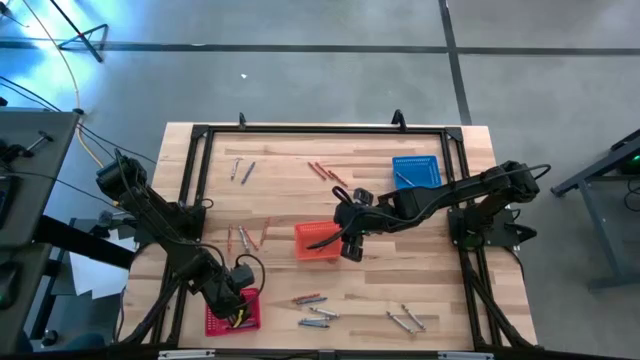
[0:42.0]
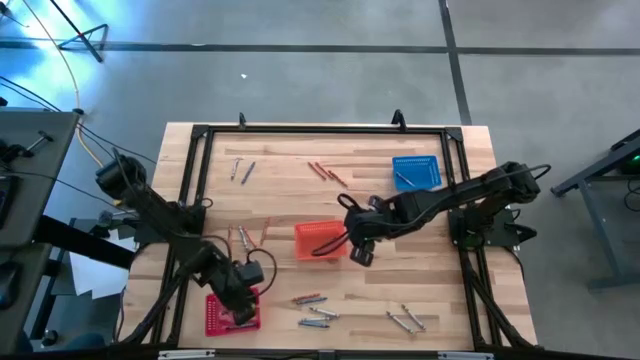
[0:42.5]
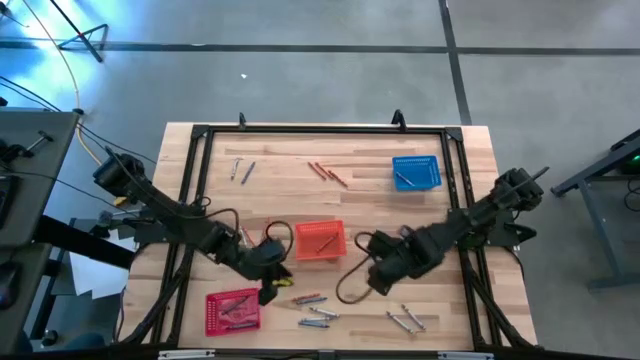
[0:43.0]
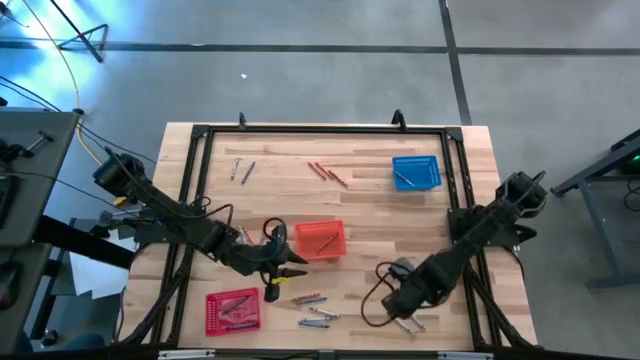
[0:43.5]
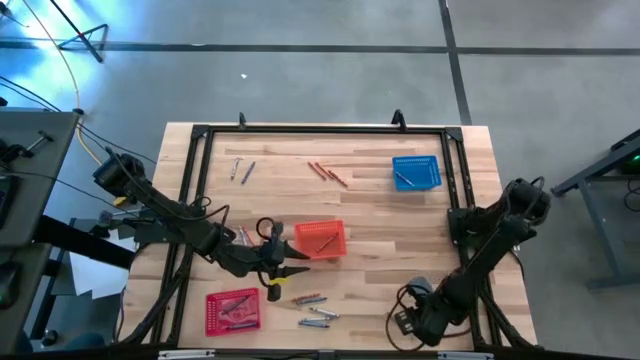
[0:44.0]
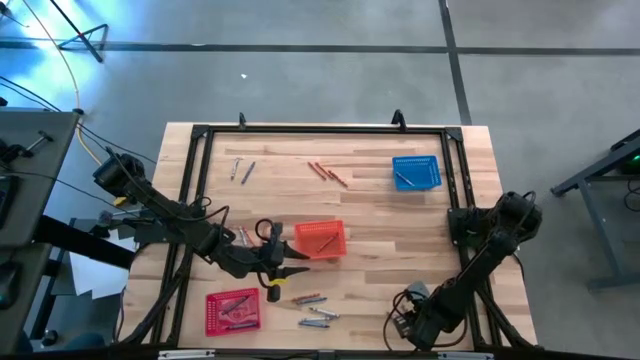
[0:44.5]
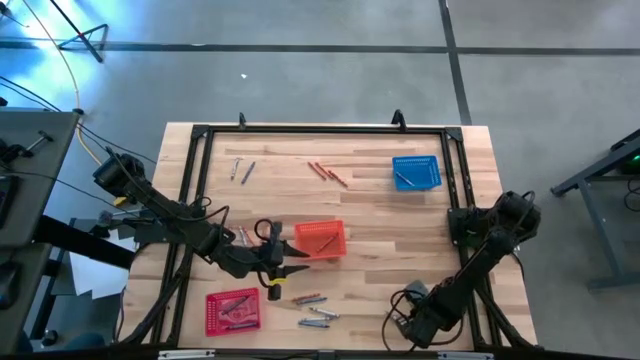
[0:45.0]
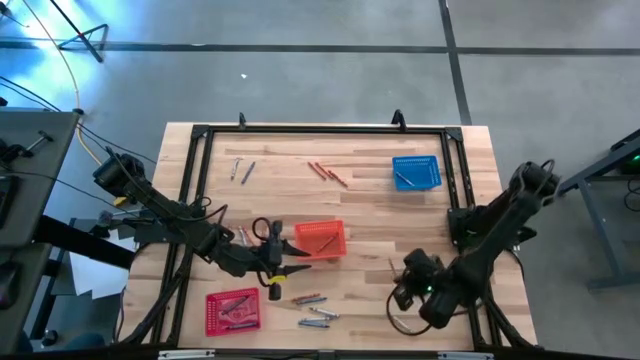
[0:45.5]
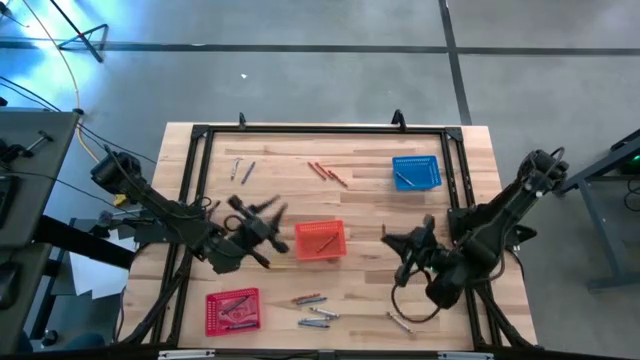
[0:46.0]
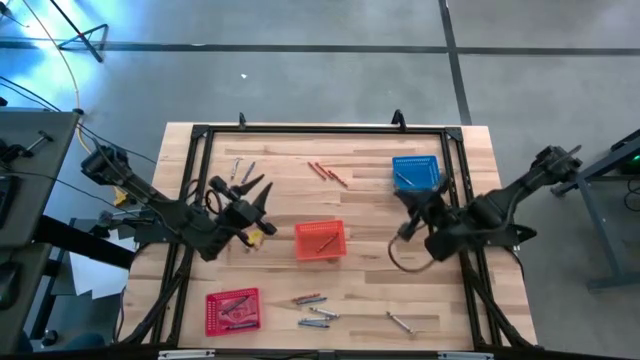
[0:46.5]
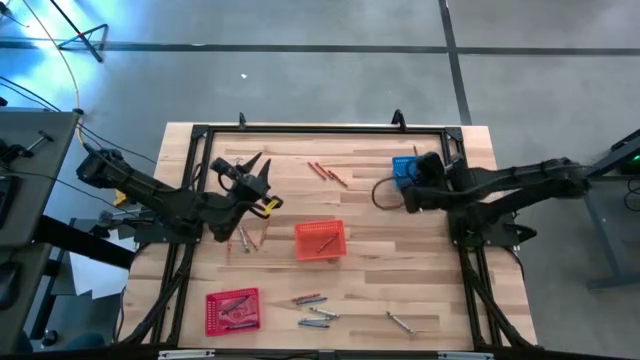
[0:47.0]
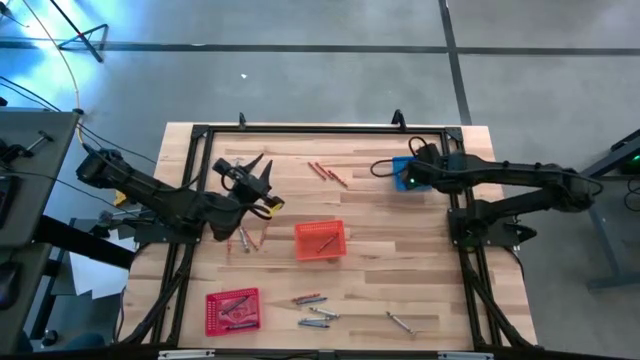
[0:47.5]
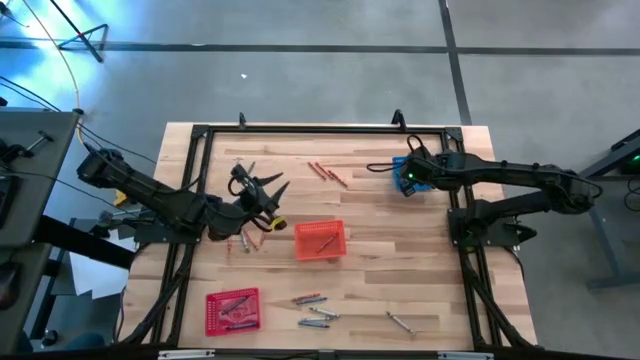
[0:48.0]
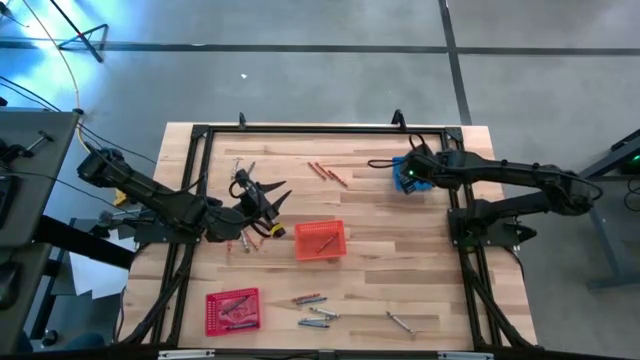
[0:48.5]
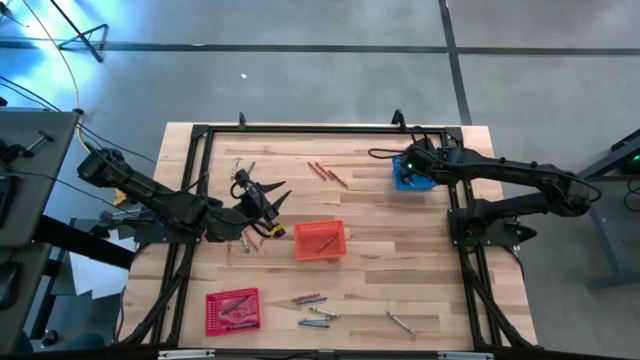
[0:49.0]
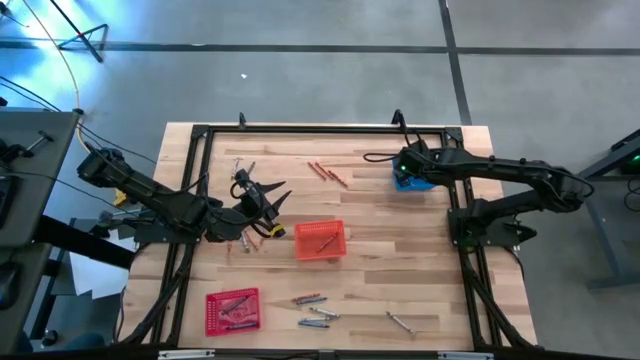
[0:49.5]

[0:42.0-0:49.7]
Task: Sort crayons
Put the gray crayon into the blue bin

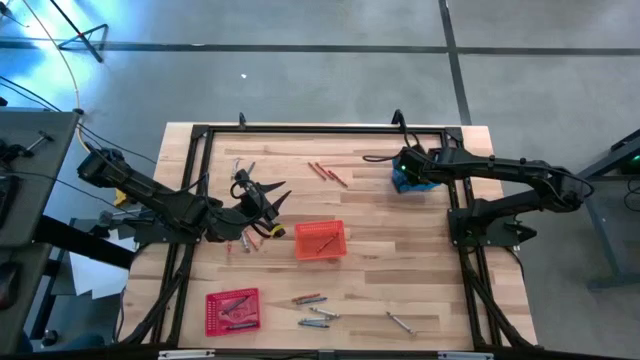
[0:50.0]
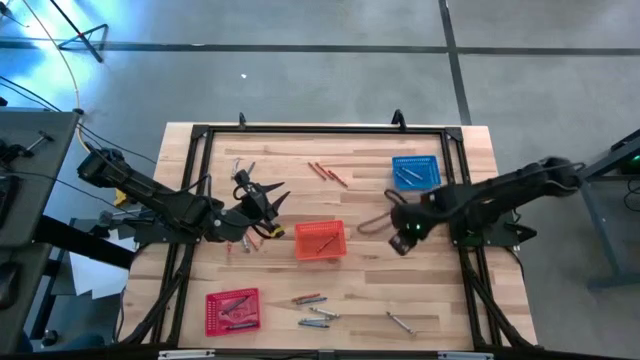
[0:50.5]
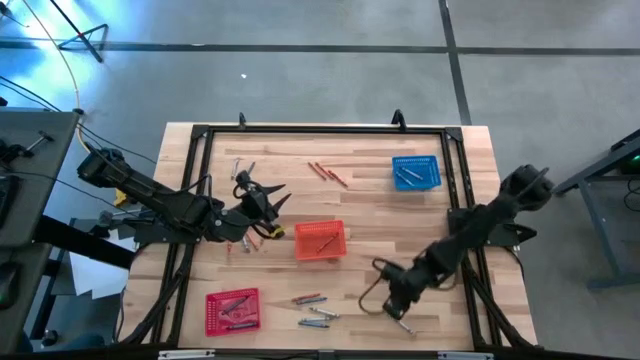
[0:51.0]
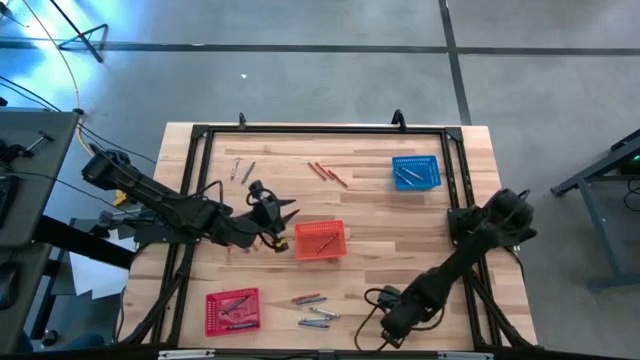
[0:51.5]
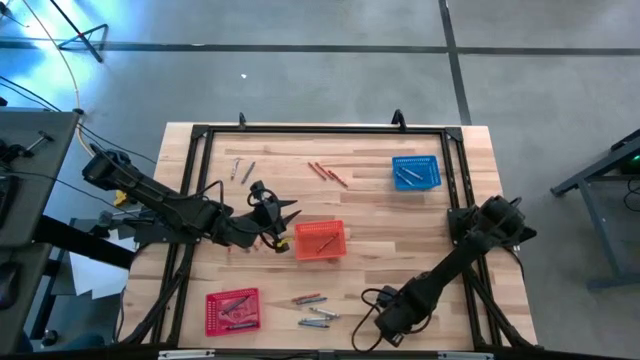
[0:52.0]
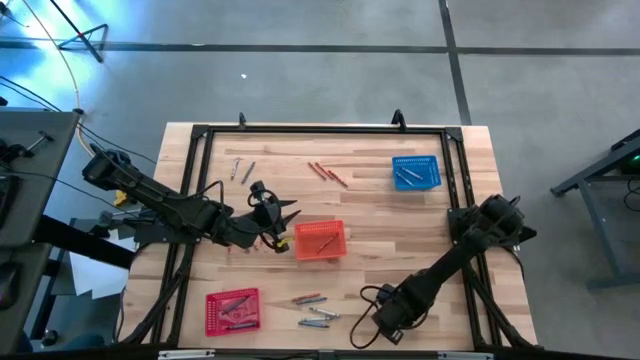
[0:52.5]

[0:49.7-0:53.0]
Put the gray crayon into the blue bin

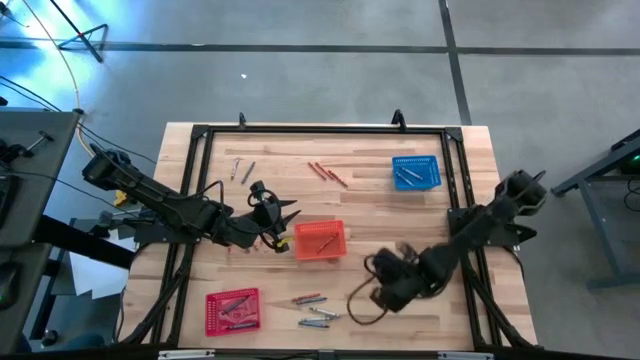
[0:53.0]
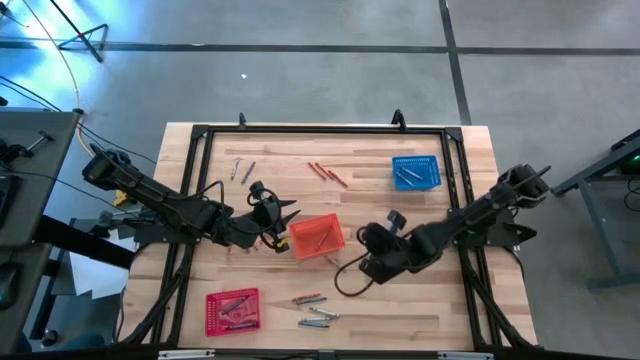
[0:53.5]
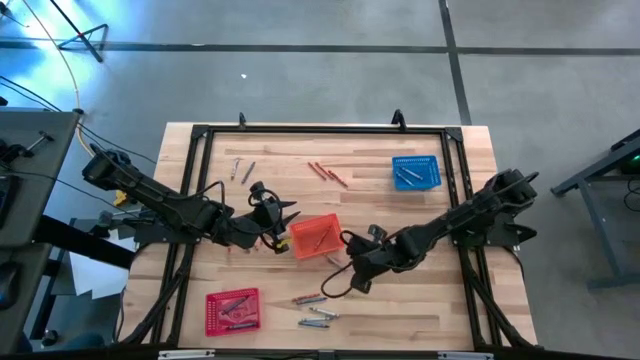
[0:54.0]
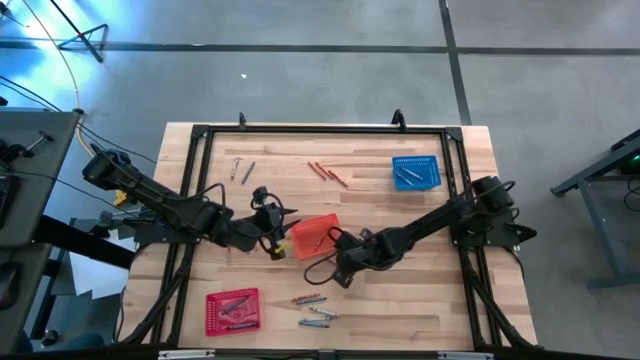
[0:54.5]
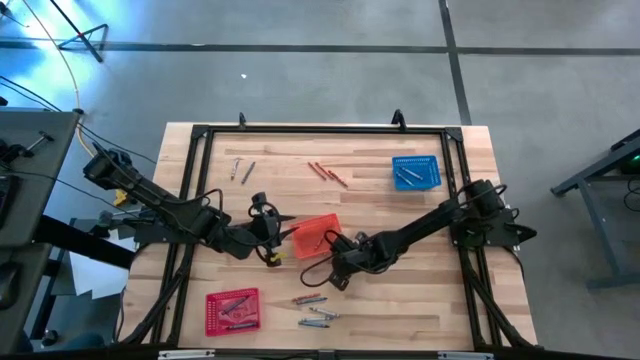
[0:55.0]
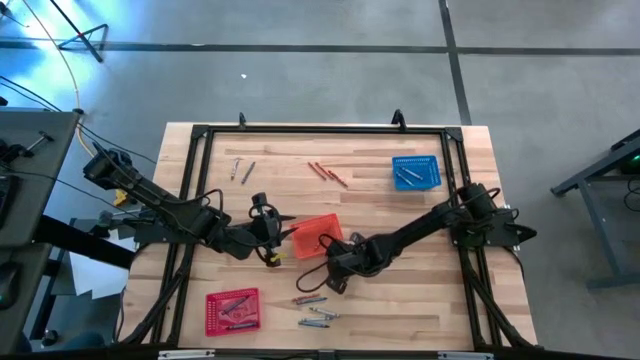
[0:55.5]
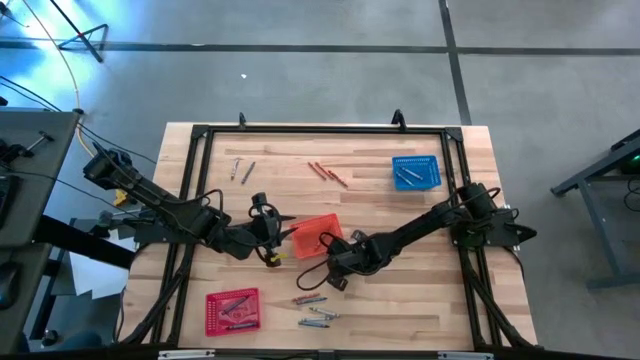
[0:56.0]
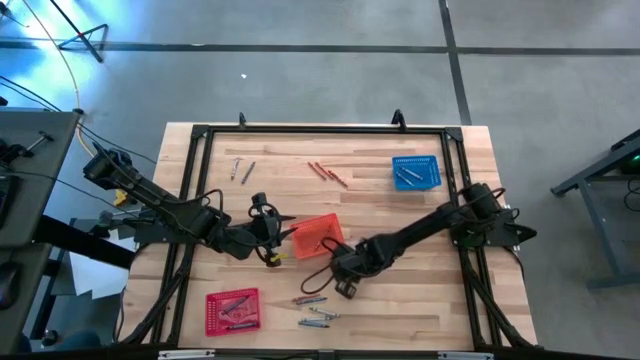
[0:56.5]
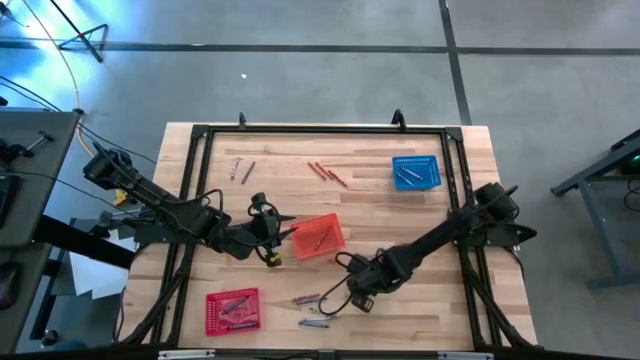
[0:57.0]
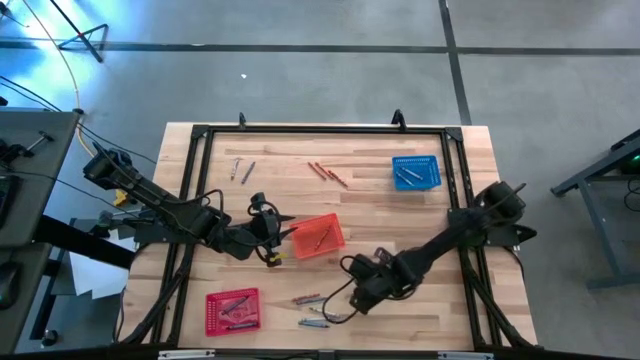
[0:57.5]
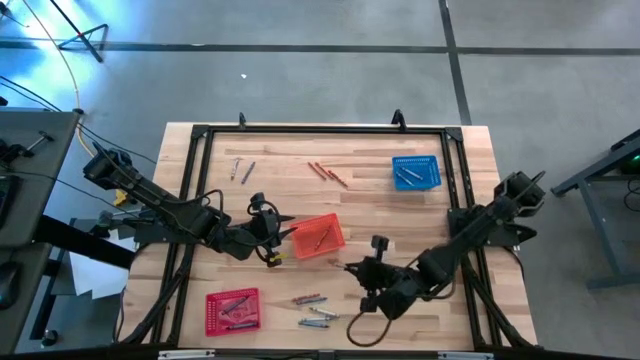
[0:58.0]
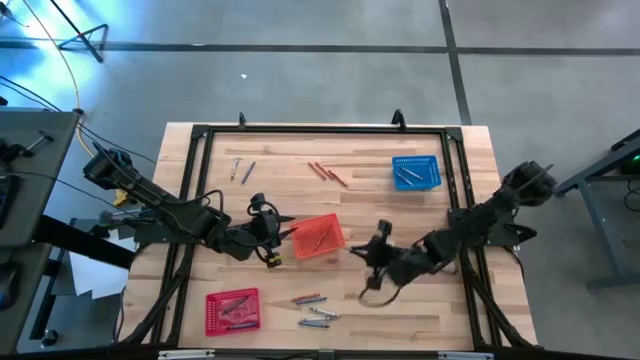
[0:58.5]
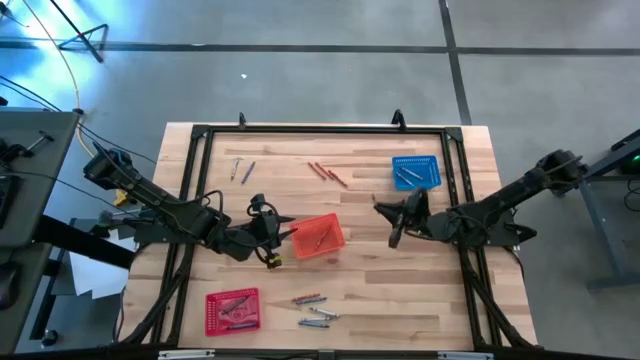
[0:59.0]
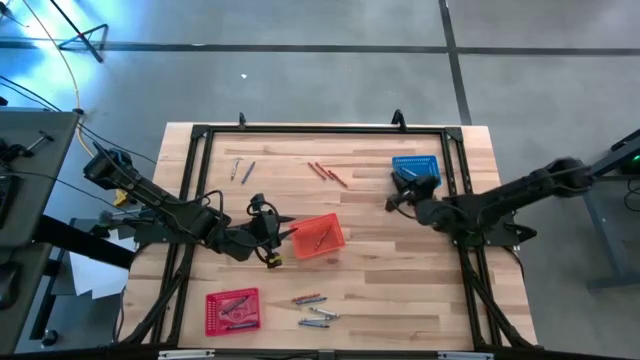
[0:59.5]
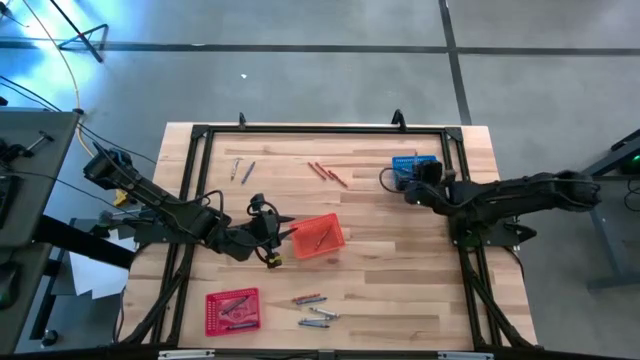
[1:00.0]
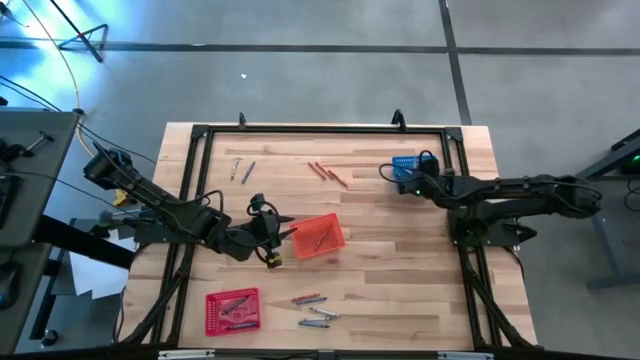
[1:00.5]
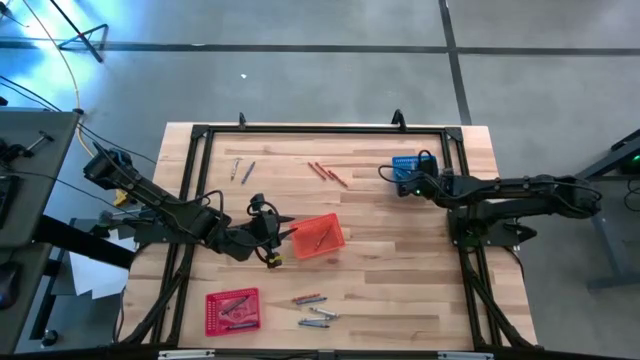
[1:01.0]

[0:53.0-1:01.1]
Put the gray crayon into the blue bin

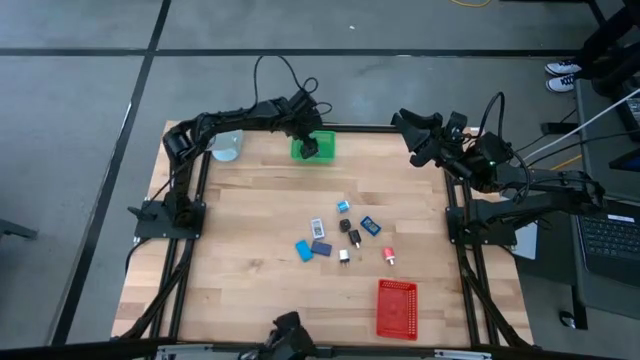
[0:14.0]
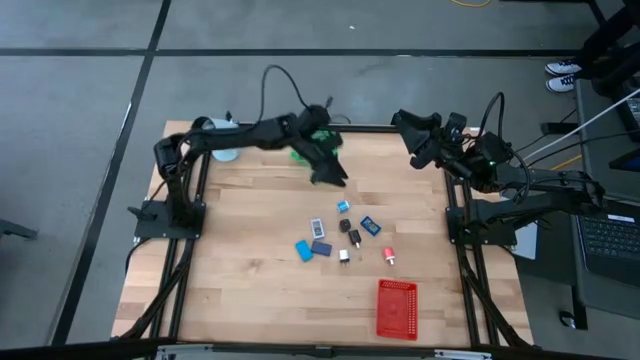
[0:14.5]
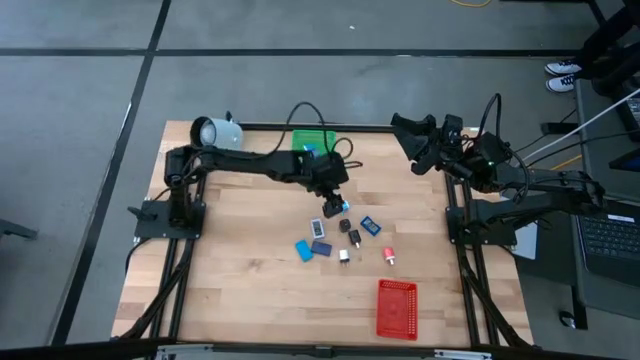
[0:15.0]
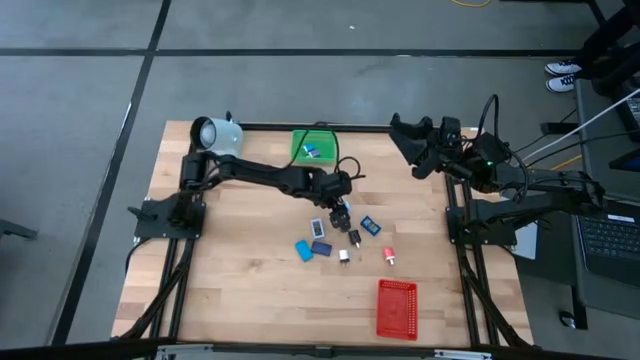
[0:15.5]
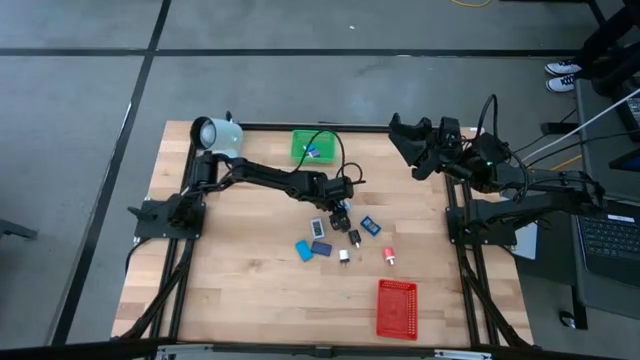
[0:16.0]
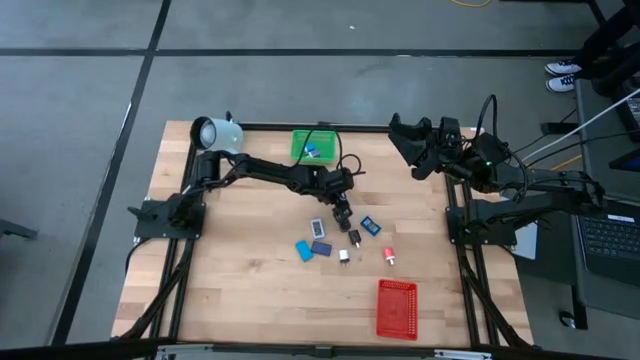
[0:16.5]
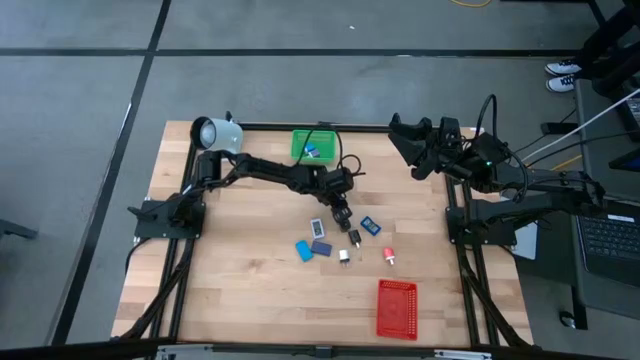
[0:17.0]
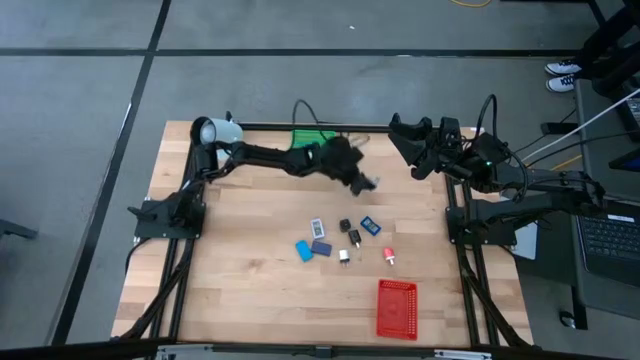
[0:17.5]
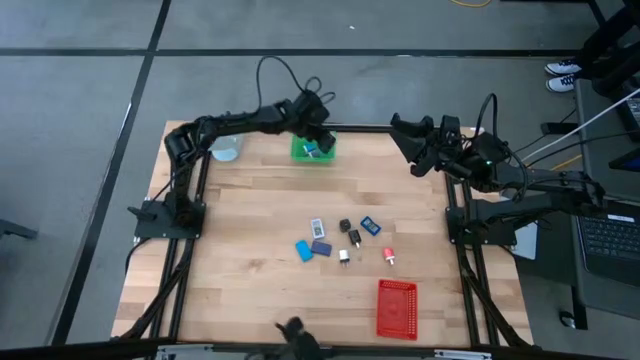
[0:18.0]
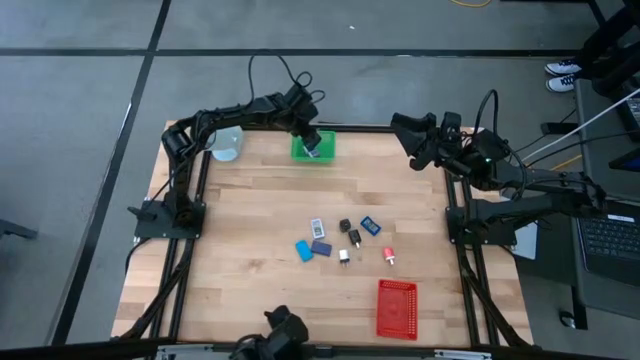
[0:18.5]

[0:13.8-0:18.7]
Task: Pick & Place Office items
Put the blue charger adapter into the green bin
